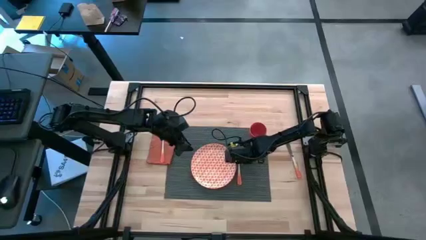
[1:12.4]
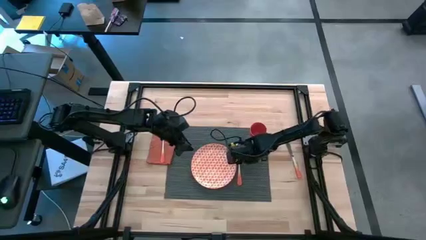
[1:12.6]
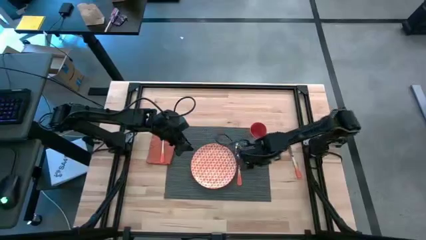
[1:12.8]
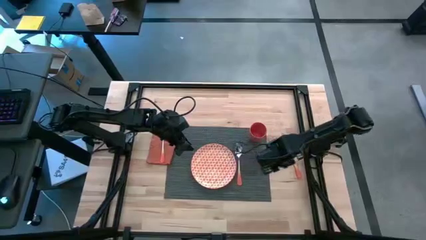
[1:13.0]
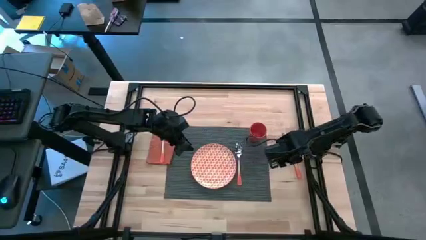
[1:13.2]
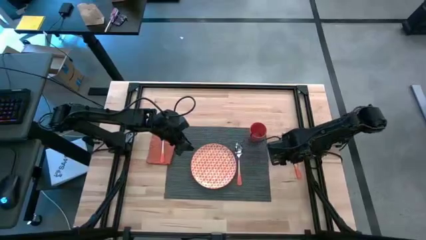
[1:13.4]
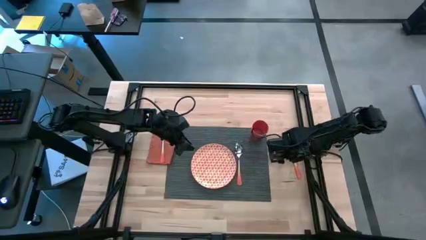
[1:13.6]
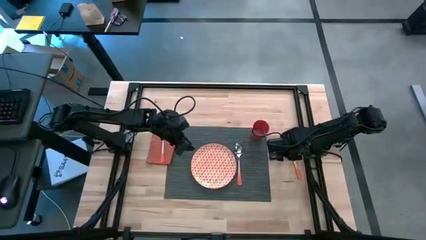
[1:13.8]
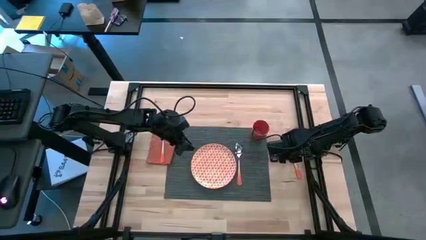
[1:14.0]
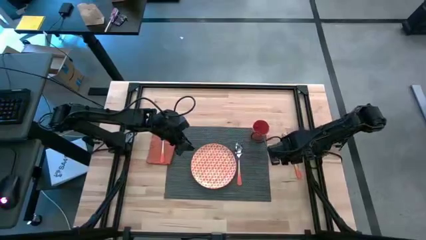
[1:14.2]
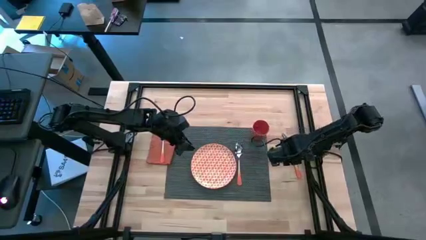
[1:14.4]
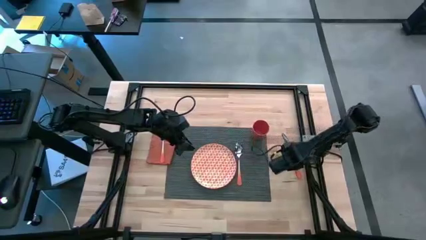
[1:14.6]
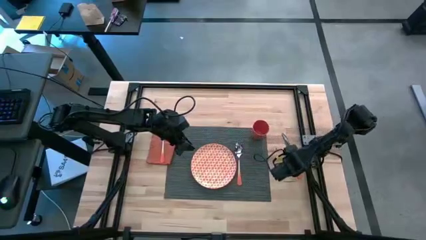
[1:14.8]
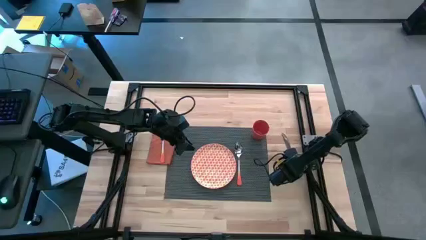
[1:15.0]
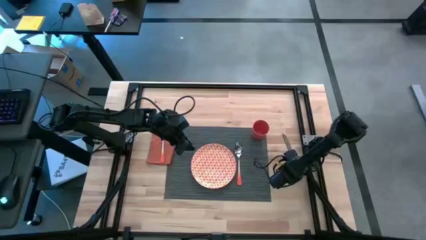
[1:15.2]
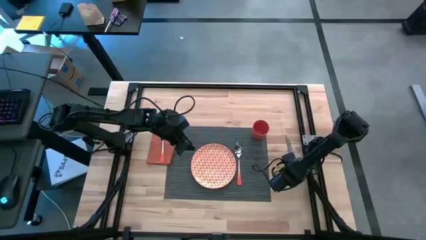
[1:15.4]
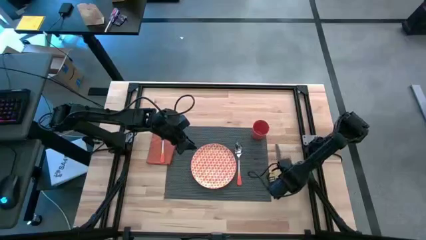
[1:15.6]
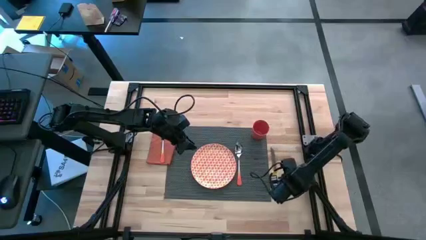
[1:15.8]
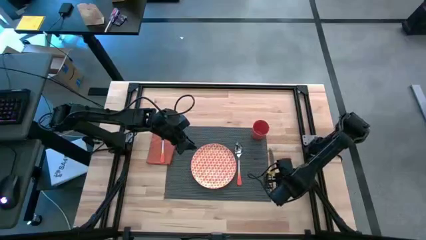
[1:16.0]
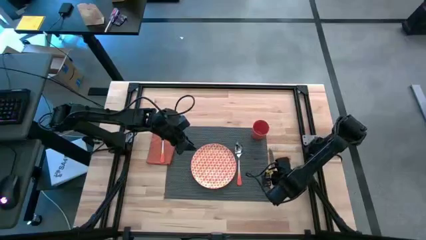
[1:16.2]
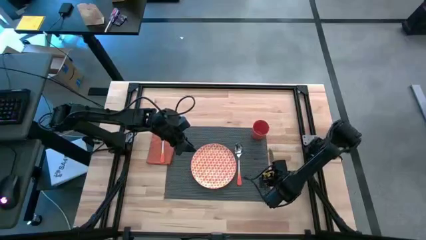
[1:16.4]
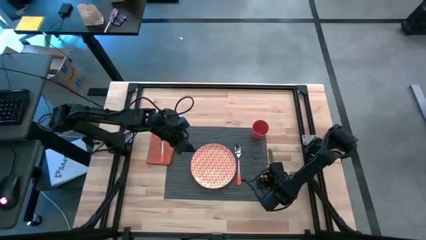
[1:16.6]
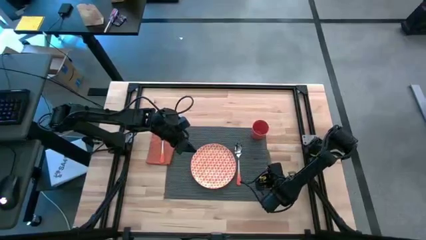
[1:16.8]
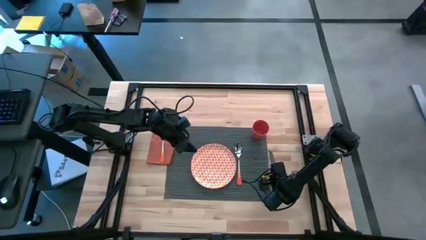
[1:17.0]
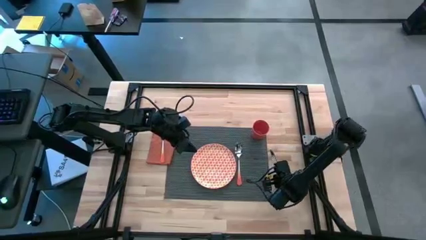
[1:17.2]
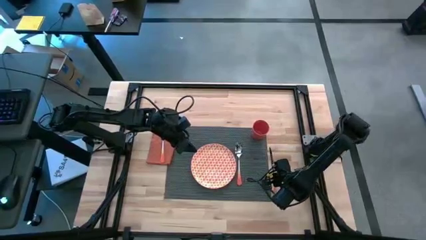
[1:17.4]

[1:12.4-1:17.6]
Task: Set table place
Put the orange table knife to the right side of the orange spoon on the table mat

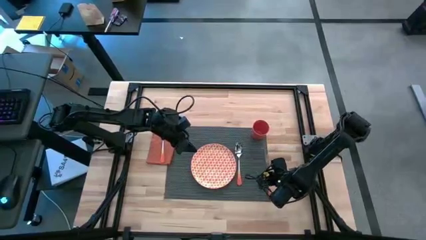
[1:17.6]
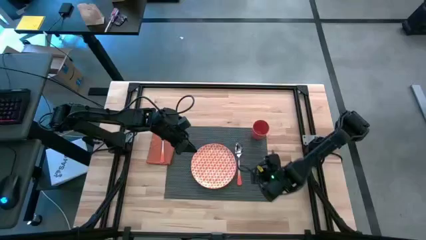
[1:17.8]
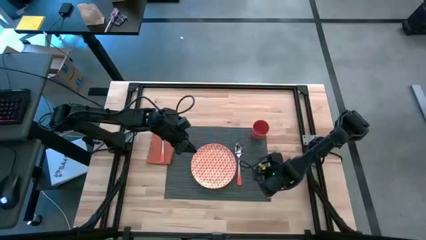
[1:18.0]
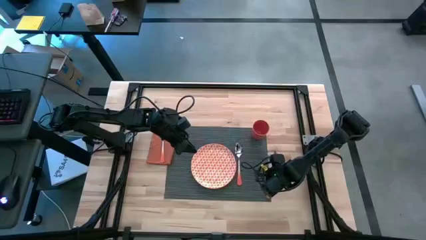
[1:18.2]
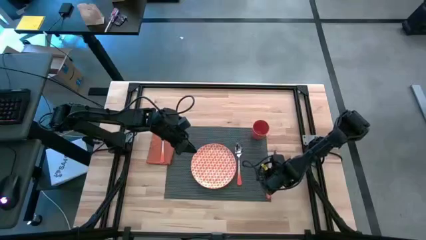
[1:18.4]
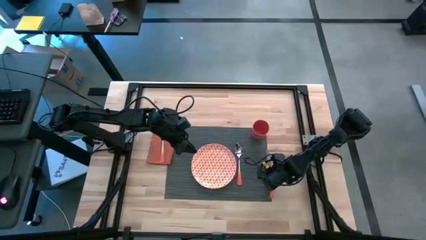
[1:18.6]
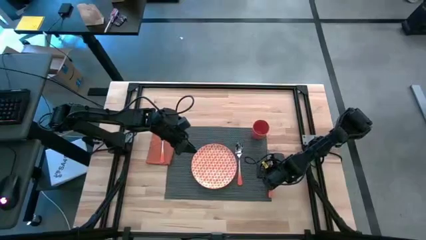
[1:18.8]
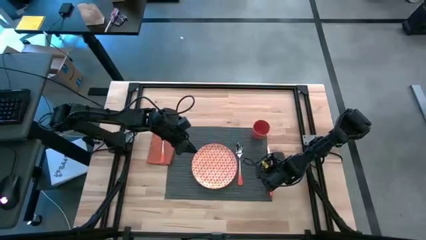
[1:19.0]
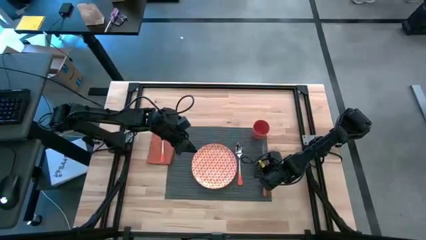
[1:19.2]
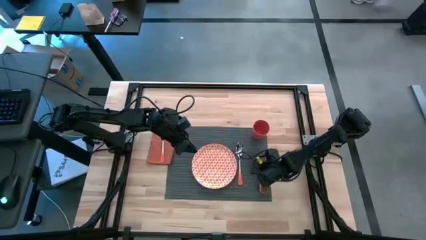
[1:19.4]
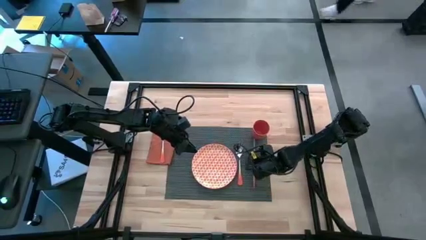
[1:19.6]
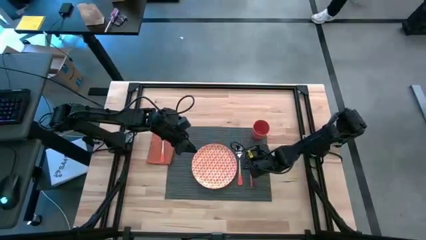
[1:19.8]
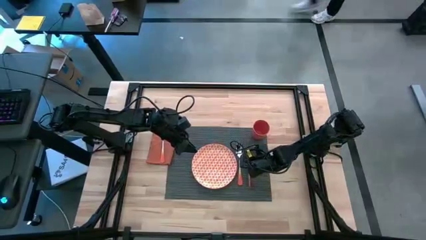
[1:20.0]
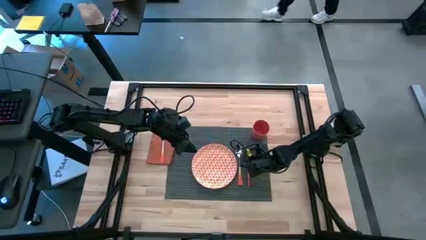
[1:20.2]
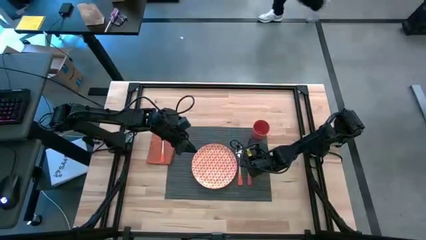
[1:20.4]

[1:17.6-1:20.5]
Put the orange table knife to the right side of the orange spoon on the table mat

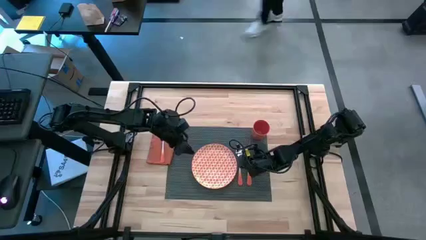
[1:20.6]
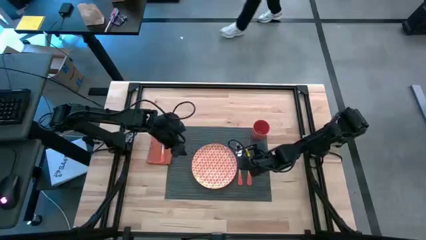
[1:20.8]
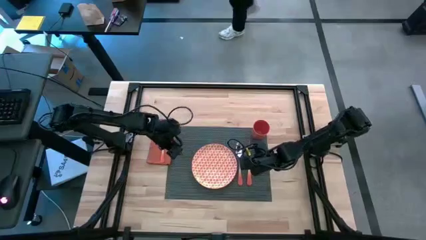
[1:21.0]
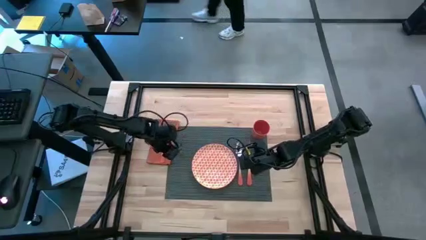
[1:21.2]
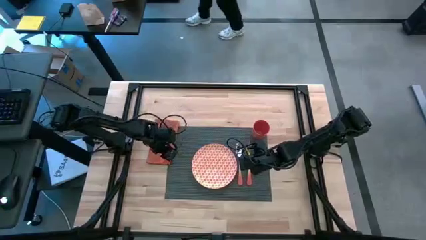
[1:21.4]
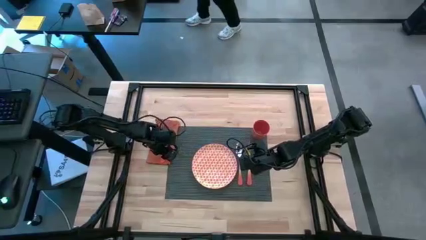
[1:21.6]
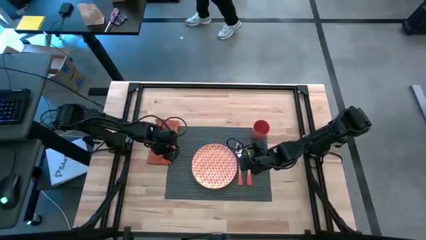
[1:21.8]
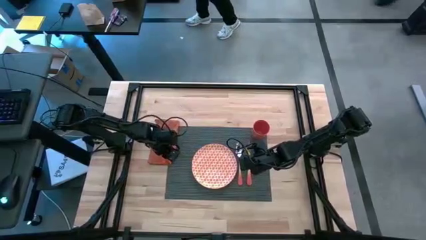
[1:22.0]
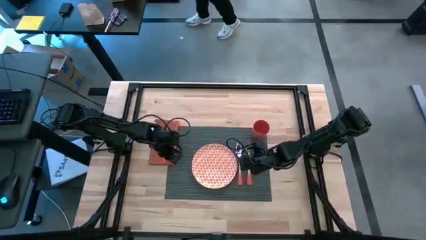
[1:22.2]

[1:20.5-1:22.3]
Put the orange table napkin with fork beside the orange plate on the table mat

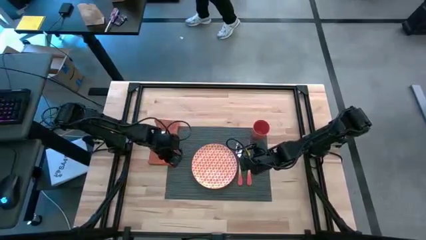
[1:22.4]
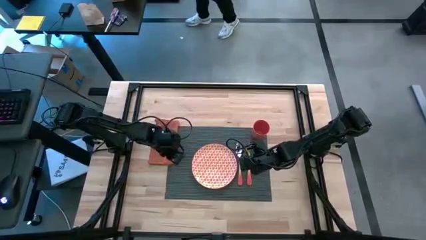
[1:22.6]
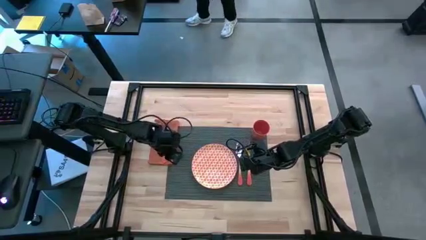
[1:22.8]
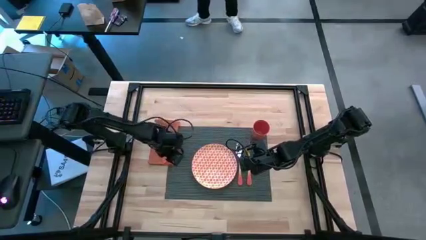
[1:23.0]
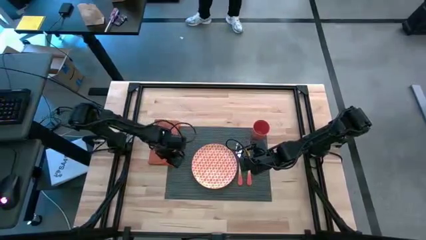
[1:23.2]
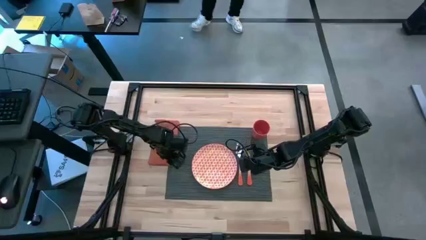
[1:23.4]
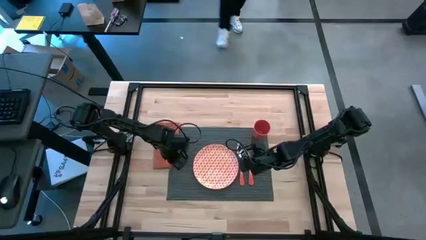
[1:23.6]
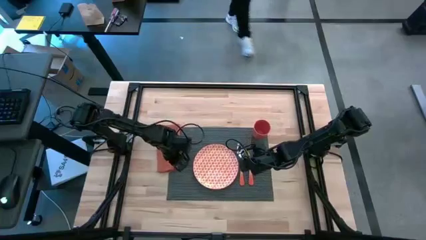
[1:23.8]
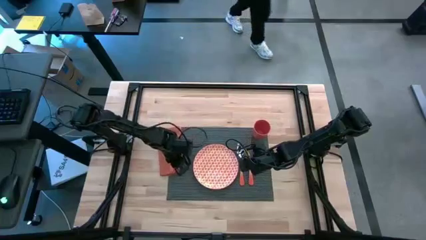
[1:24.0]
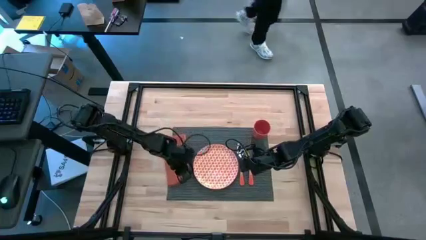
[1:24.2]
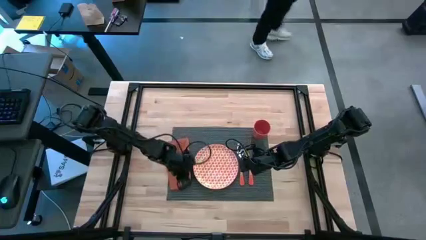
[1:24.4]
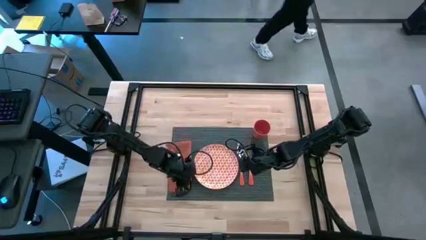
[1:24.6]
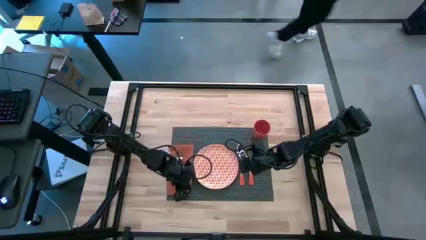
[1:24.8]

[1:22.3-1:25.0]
Put the orange table napkin with fork beside the orange plate on the table mat
